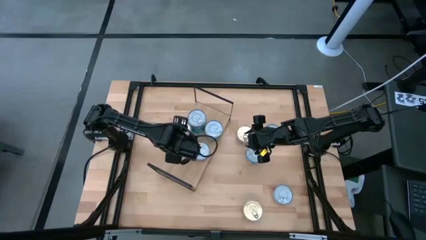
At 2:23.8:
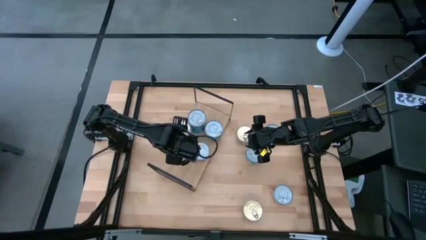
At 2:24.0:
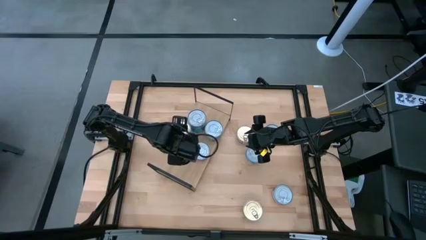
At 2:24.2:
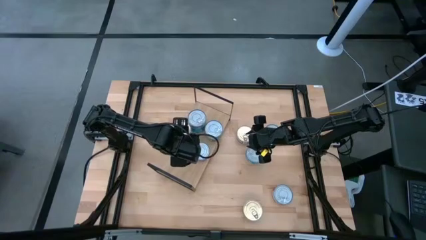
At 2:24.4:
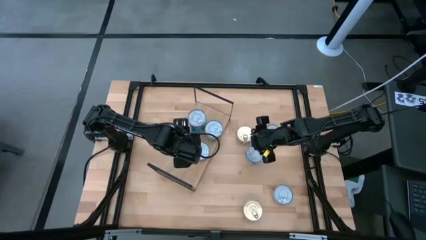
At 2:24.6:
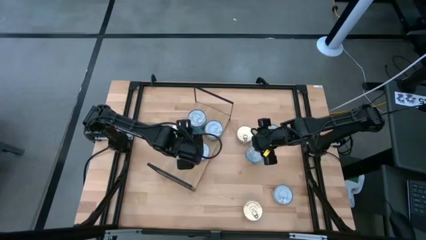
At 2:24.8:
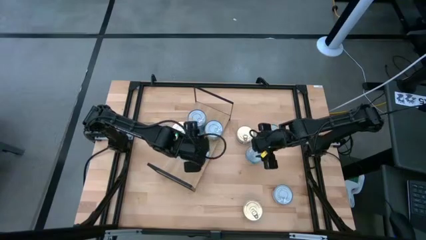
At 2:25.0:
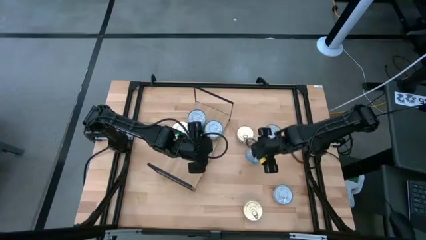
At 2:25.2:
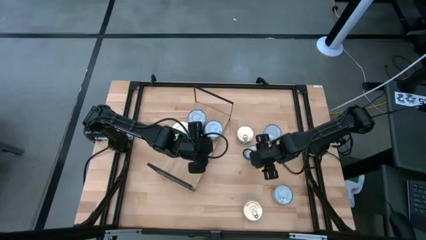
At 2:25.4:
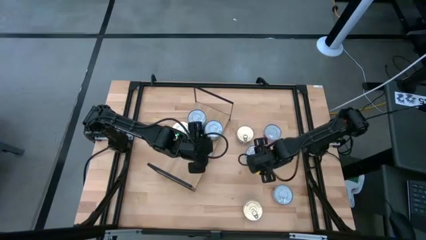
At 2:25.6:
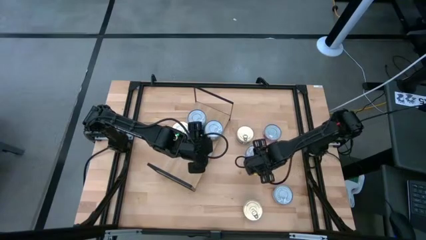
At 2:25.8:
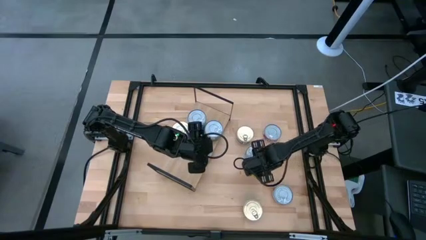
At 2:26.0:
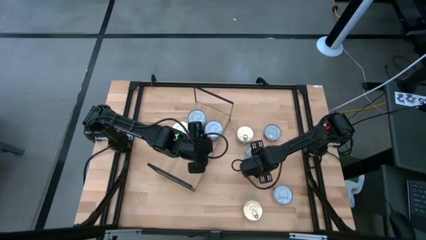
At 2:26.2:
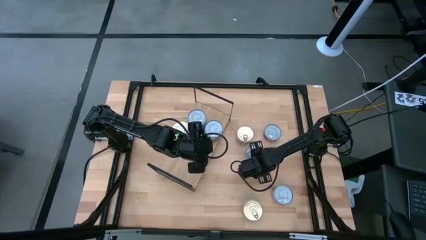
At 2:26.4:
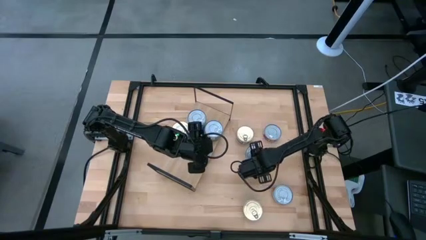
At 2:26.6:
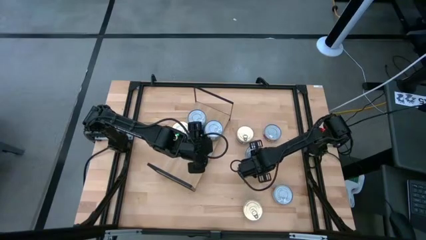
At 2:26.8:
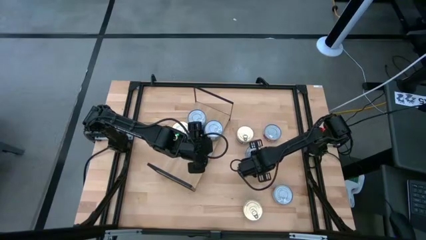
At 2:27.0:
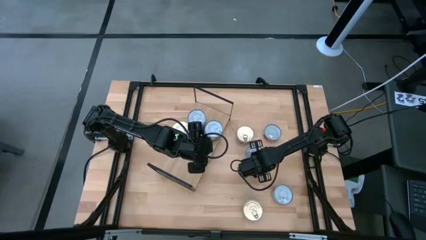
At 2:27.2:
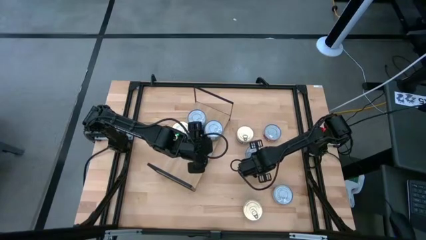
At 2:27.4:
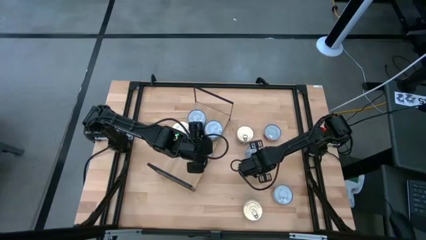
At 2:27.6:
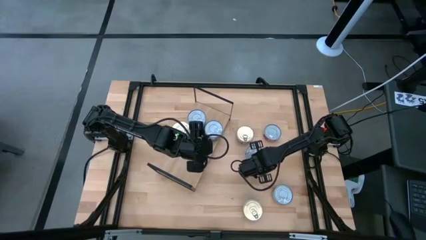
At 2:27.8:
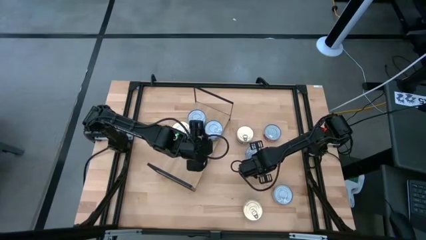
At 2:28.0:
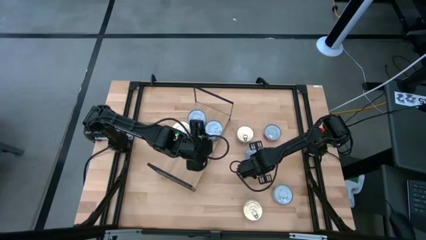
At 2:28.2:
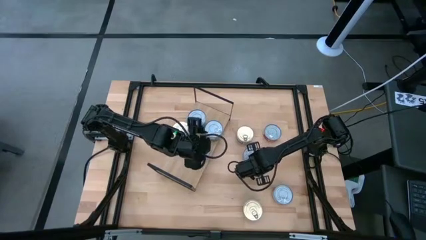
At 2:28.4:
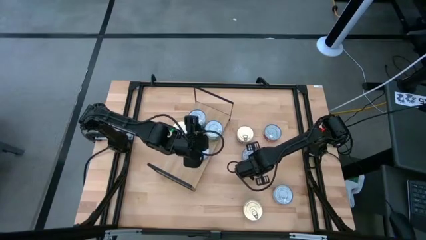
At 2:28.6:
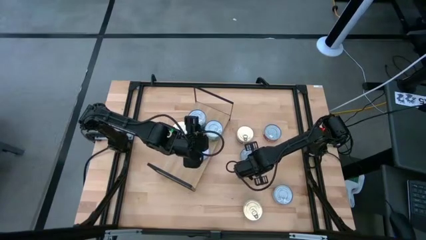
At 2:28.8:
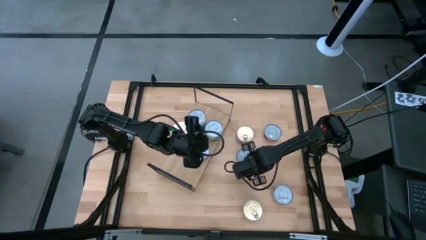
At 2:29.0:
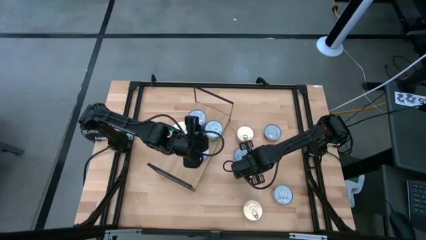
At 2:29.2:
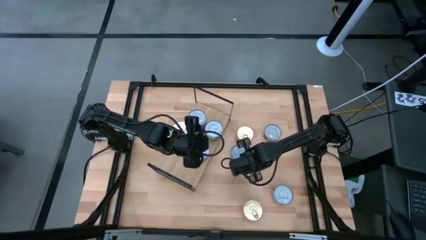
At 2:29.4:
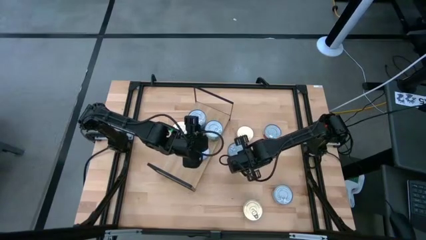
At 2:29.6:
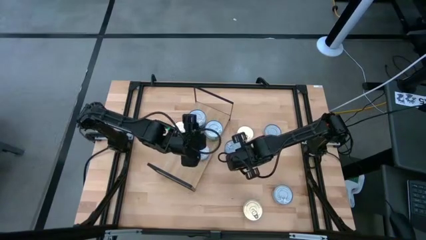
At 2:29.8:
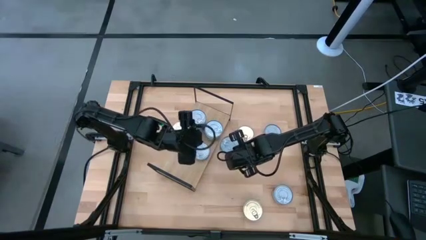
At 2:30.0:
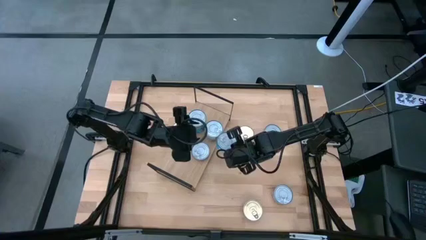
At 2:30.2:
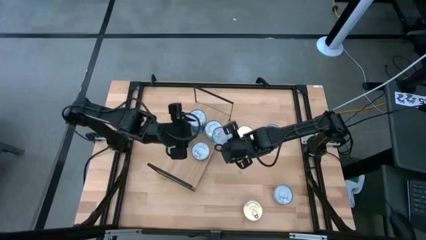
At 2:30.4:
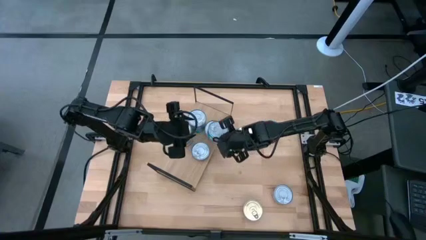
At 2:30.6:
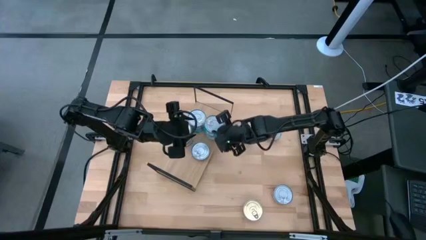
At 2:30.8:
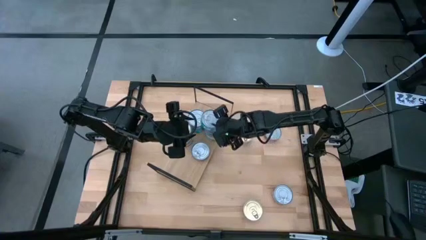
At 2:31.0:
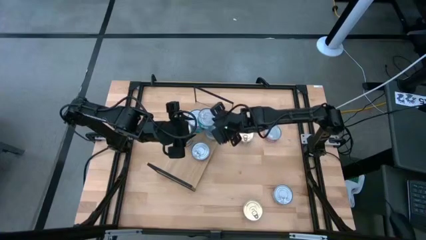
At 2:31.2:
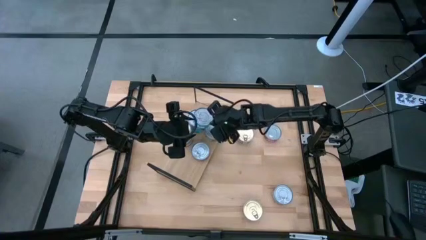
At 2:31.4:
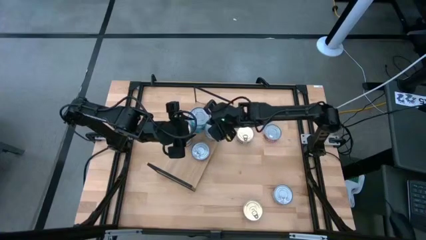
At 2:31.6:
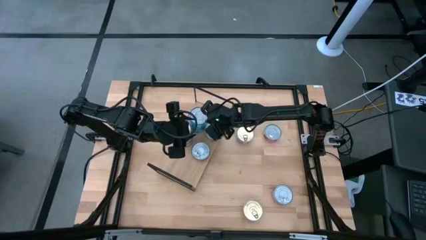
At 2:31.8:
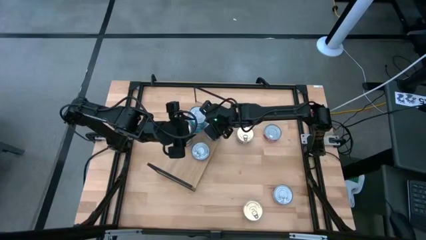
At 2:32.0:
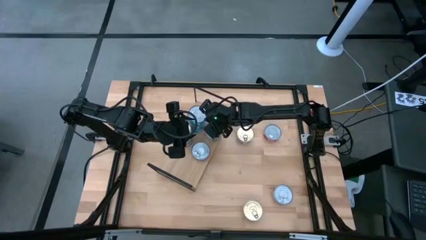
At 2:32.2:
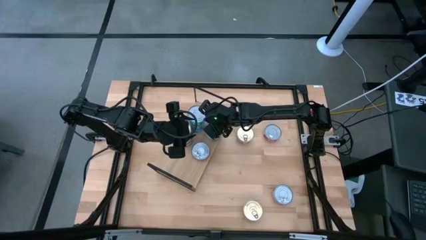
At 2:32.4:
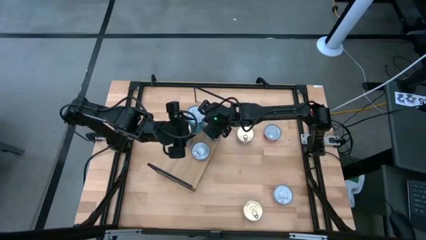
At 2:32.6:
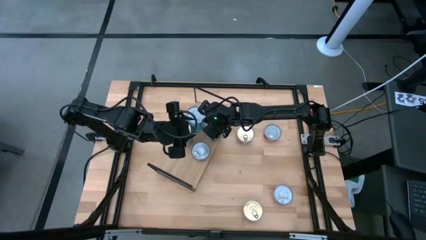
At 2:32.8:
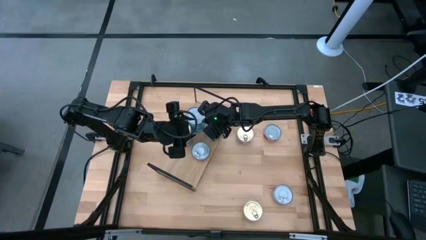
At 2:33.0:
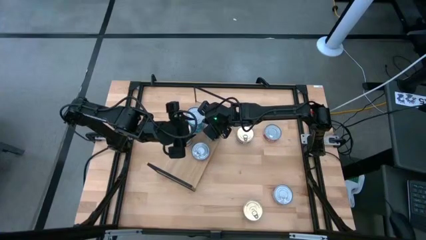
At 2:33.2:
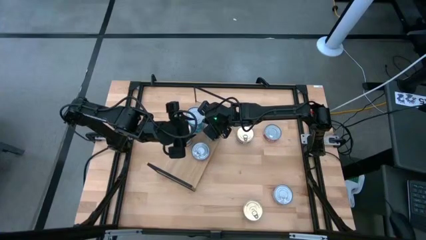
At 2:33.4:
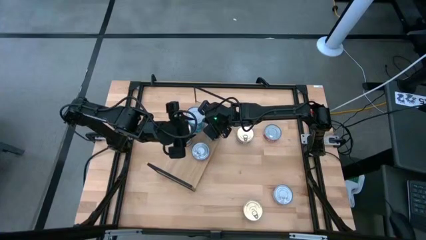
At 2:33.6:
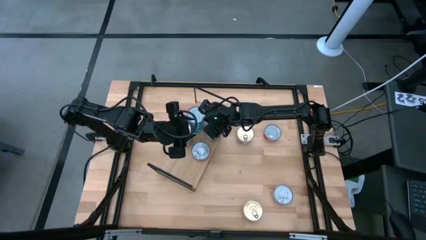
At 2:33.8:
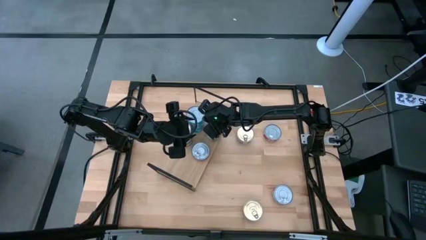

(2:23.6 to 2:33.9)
Task: Stack canned seafood by type on shelf
Stack the light blue tuna can on top of the light blue tuna can on the shelf

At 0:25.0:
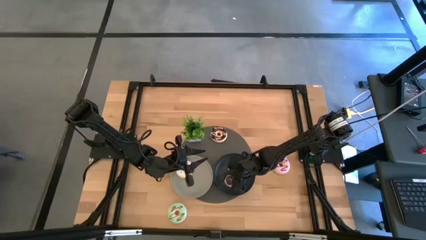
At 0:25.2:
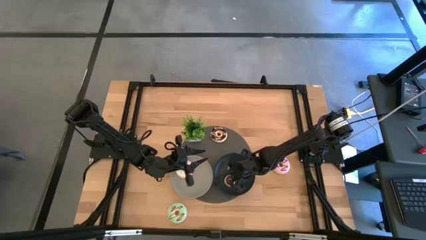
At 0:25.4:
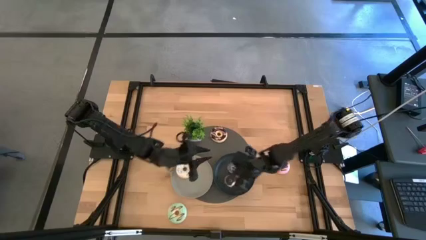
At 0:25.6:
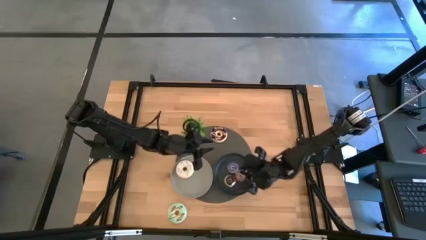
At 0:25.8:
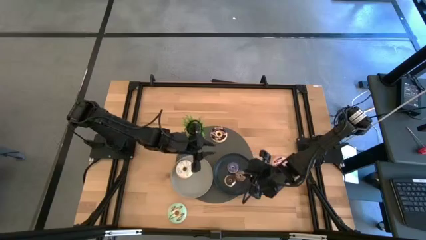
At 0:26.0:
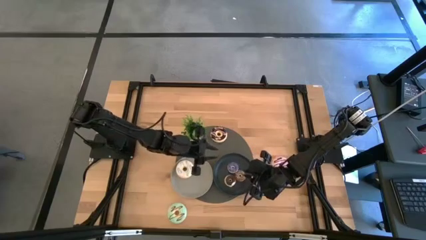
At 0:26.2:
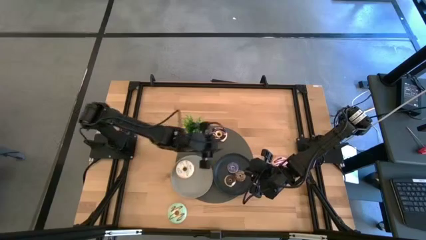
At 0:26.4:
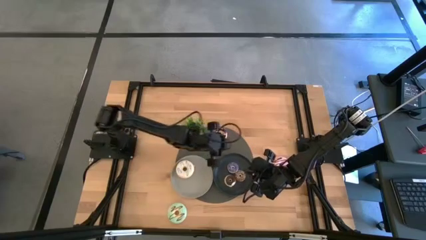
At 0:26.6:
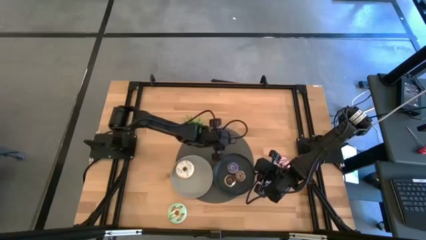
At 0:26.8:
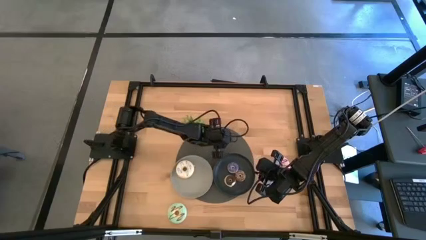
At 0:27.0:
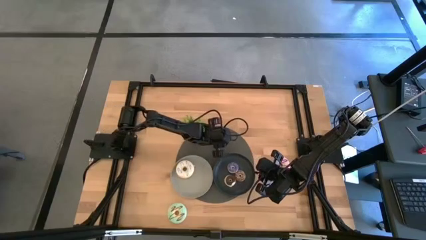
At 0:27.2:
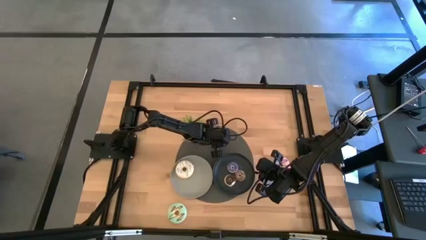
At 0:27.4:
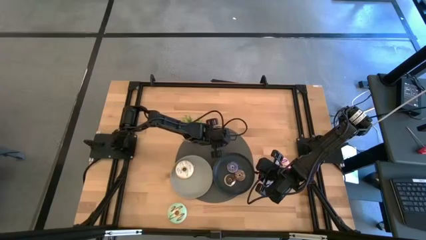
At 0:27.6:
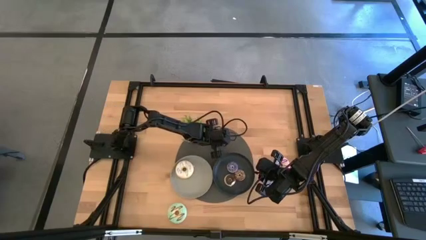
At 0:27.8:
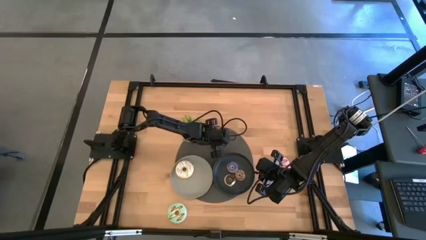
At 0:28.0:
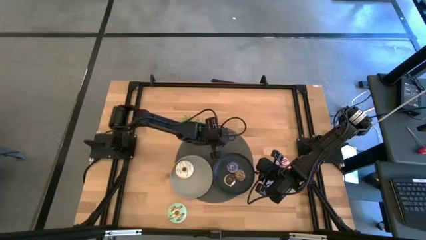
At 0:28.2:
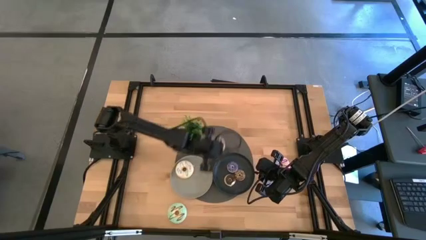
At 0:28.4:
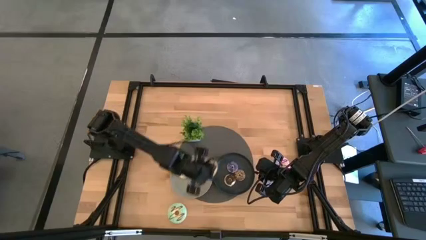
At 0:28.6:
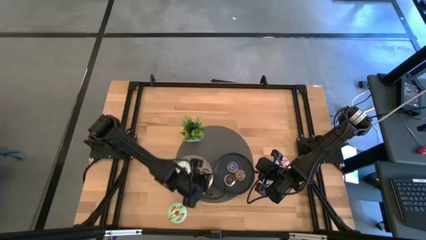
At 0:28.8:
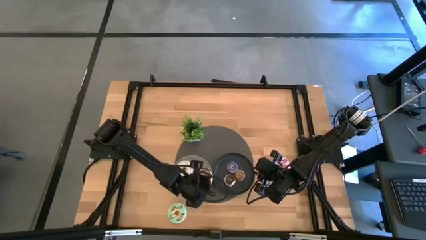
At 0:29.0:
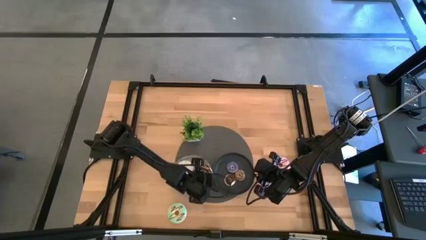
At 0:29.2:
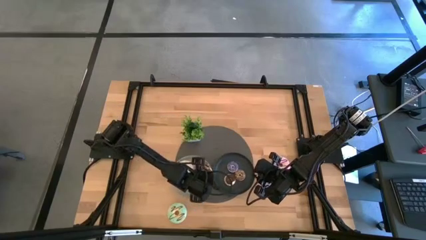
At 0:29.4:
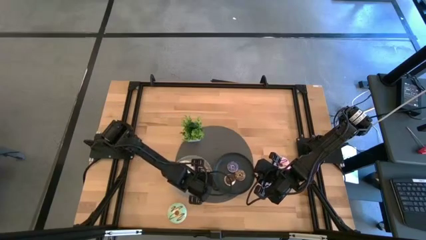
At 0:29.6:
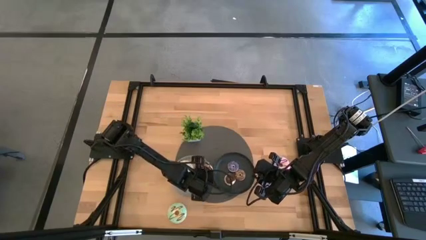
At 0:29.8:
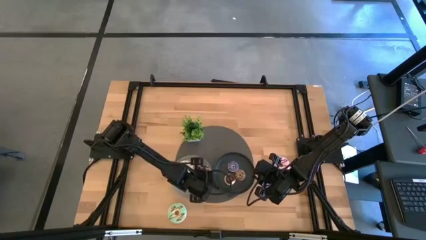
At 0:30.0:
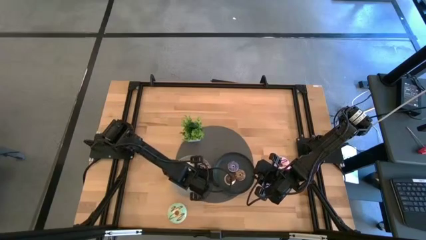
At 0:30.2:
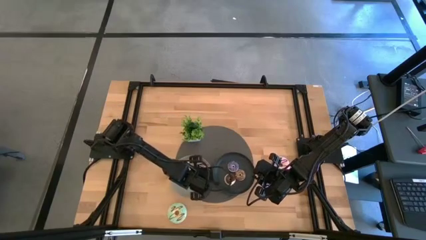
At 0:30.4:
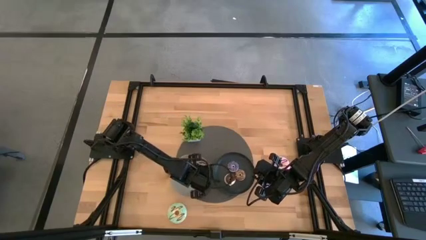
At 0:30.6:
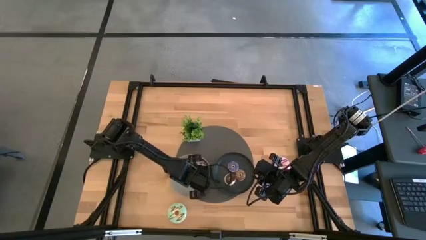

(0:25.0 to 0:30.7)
Task: Pick & Place donuts
Put the large black donut on the gray plate
